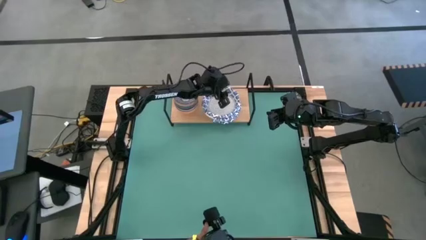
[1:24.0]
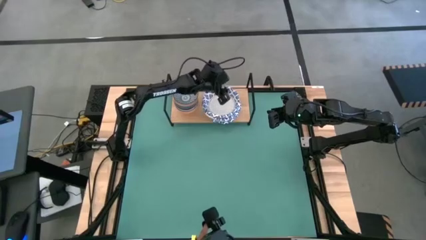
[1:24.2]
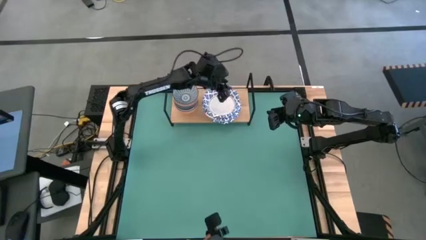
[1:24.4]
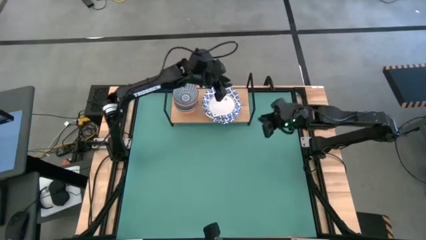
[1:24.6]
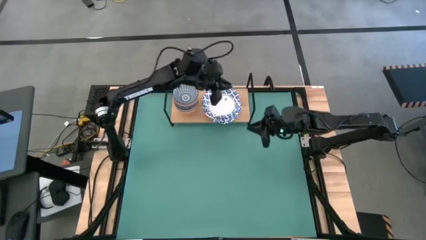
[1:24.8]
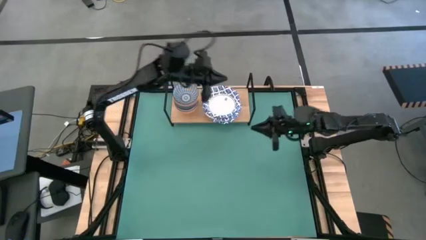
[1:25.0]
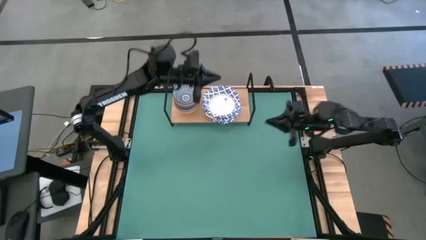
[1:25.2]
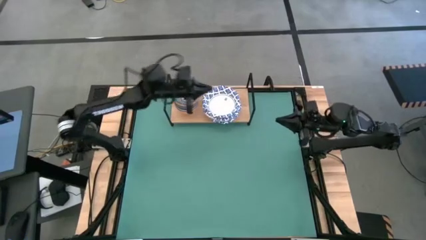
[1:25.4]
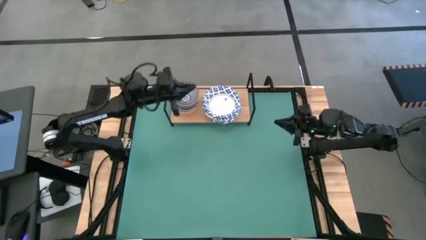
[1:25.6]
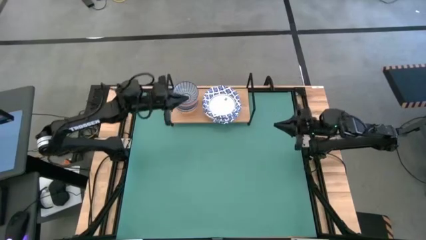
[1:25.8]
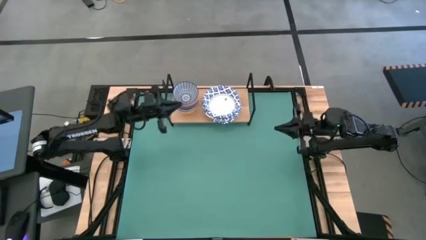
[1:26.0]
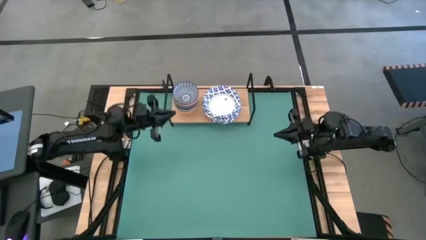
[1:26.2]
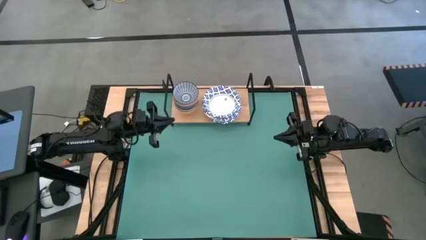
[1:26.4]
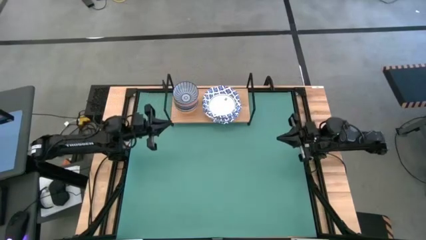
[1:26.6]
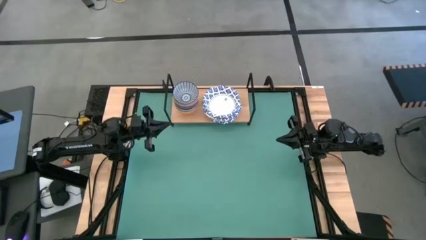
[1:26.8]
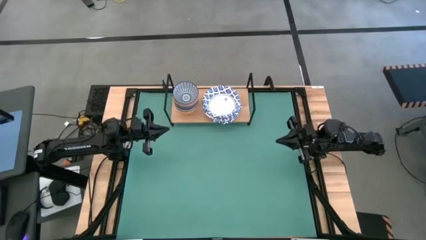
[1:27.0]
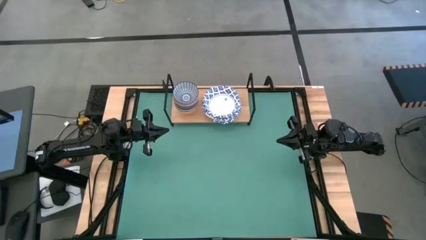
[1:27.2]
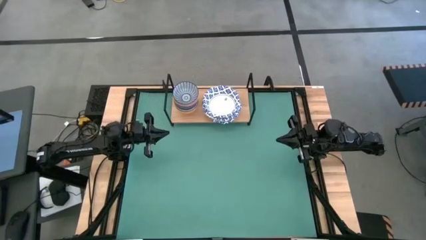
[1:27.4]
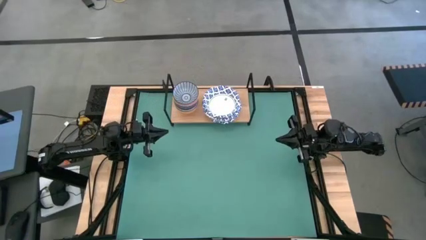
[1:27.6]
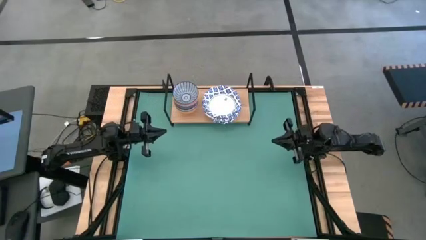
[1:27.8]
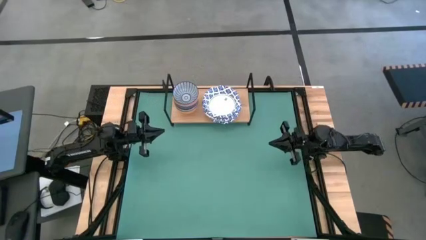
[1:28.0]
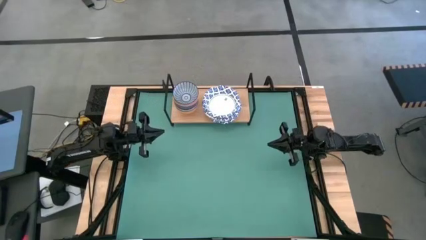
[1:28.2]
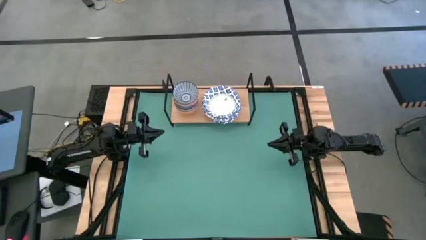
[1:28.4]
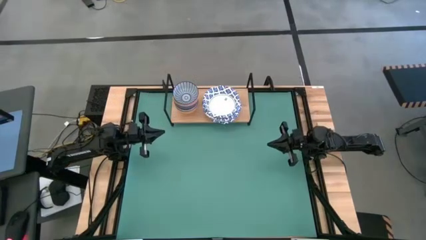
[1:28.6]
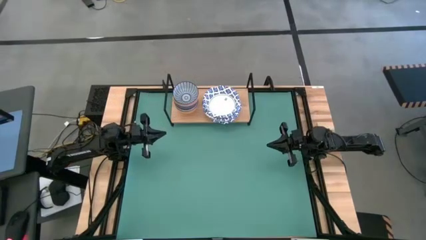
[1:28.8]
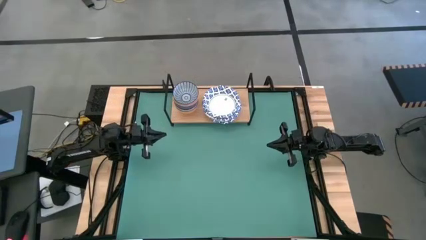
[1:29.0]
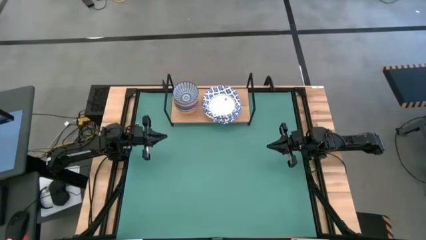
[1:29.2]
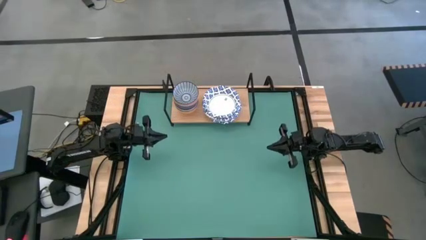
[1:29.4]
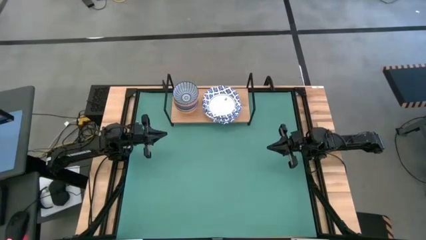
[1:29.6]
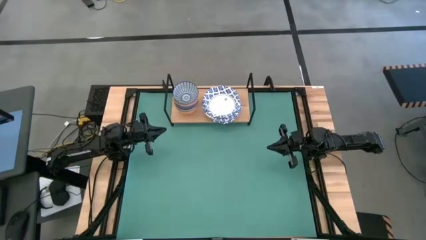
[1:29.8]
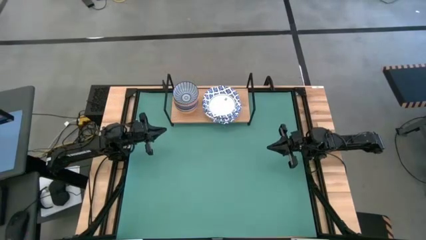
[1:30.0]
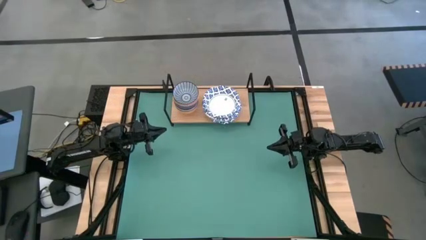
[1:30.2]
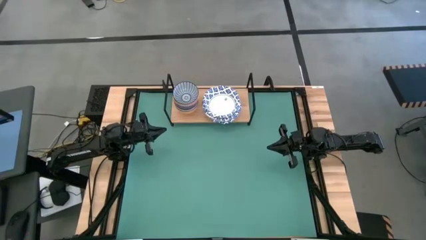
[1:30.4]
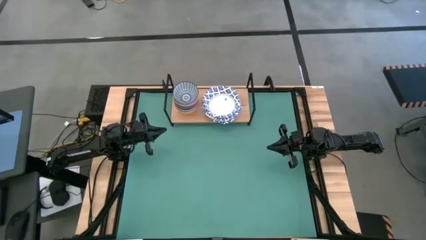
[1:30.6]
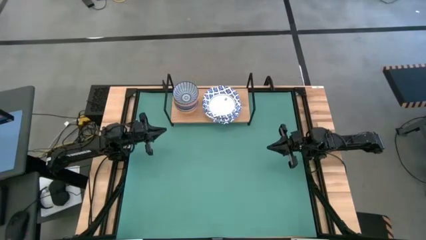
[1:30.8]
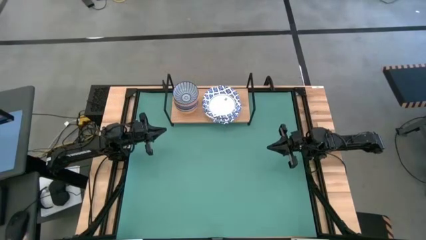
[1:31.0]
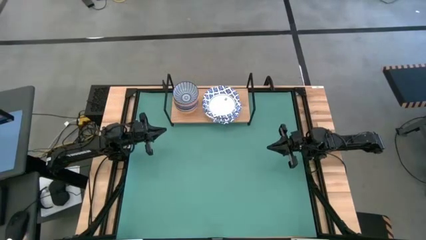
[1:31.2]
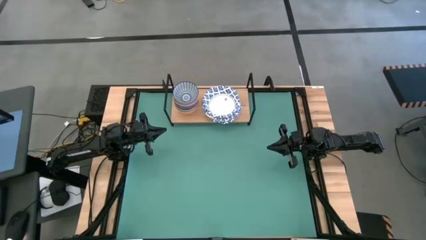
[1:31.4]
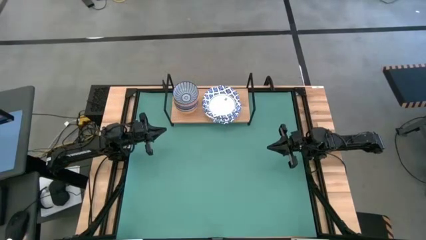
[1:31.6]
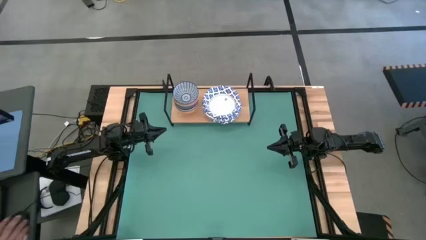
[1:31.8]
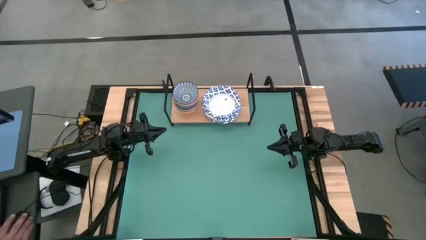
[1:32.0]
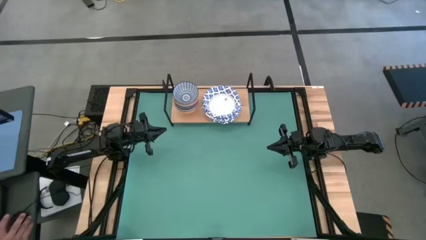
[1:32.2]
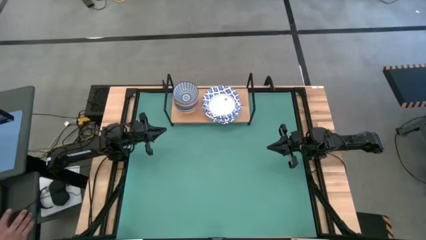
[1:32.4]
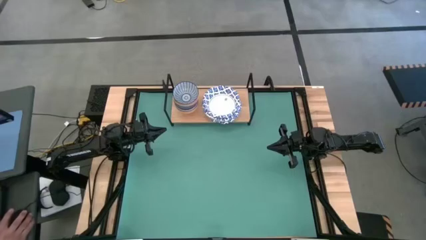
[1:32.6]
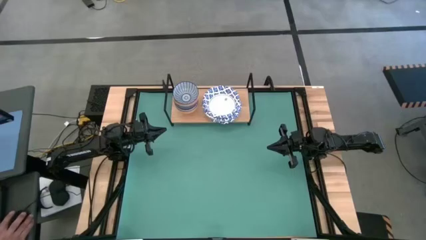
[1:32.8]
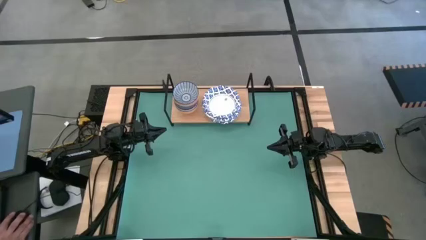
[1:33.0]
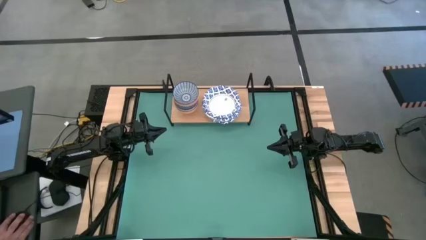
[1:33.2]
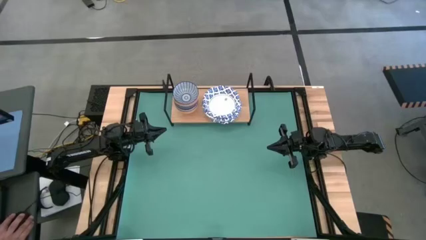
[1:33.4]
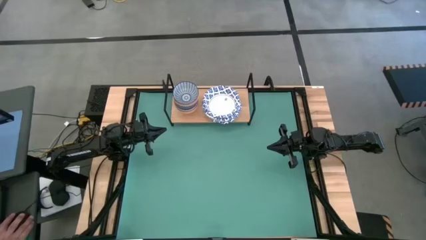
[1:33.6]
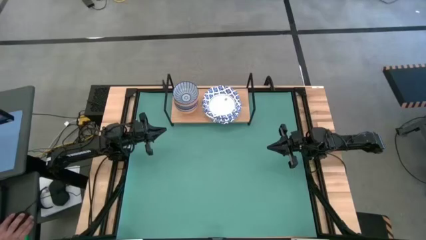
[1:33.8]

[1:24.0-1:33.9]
Task: Place and stack bowls onto a shelf
Return to Home Position

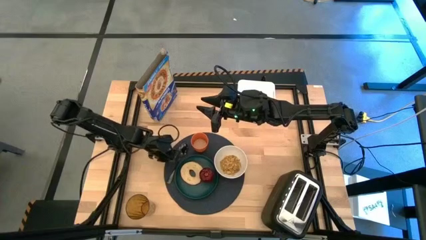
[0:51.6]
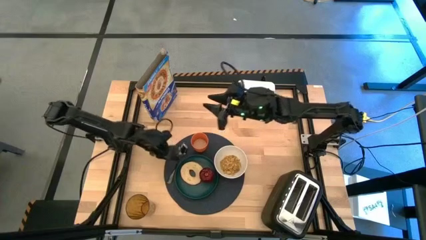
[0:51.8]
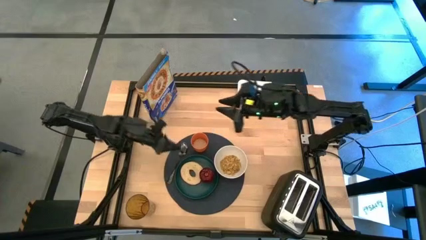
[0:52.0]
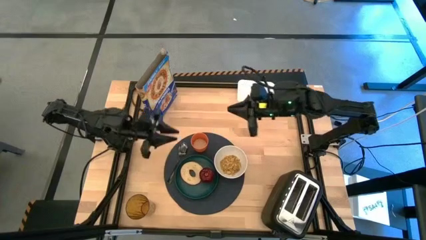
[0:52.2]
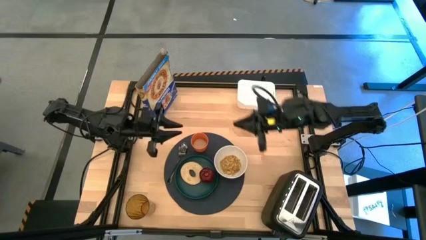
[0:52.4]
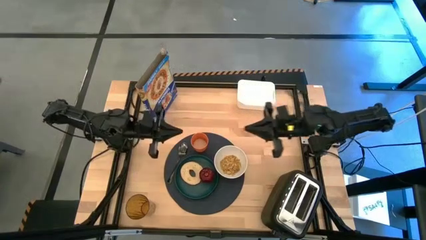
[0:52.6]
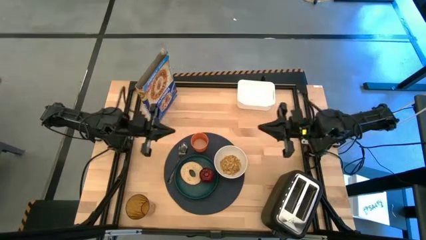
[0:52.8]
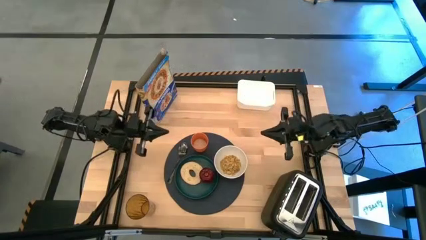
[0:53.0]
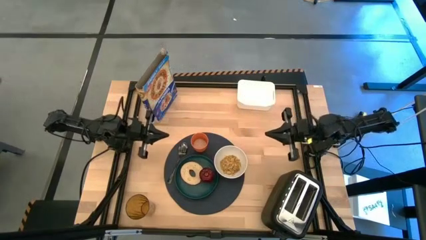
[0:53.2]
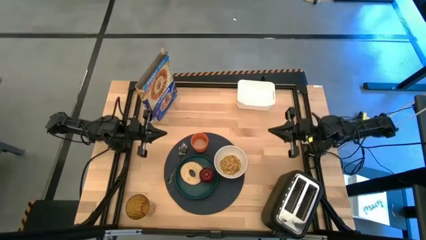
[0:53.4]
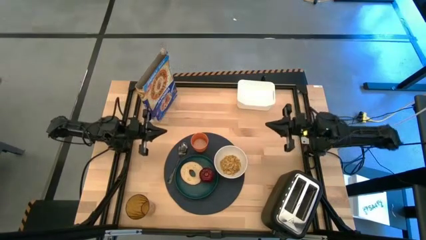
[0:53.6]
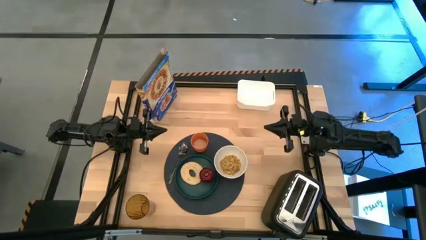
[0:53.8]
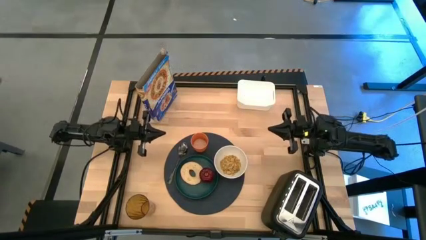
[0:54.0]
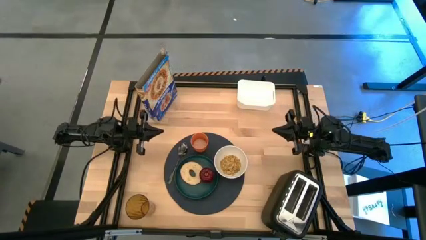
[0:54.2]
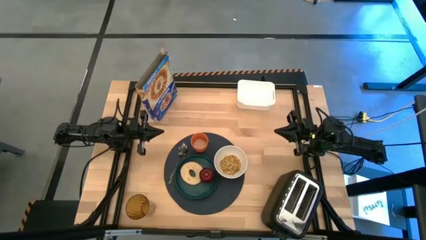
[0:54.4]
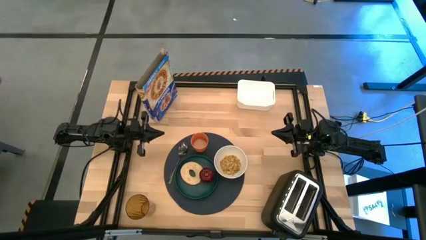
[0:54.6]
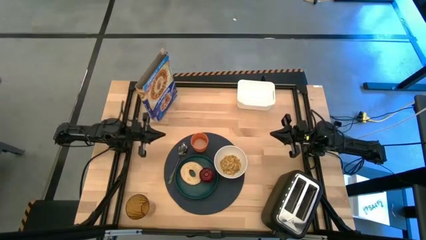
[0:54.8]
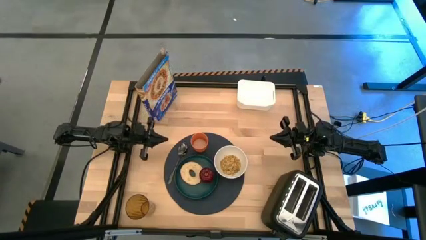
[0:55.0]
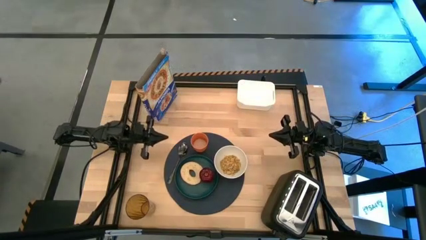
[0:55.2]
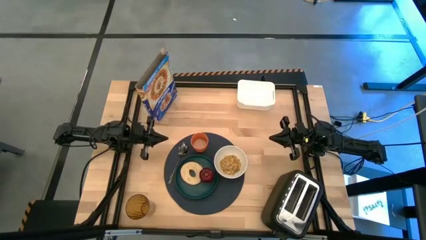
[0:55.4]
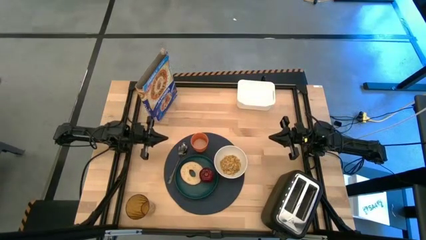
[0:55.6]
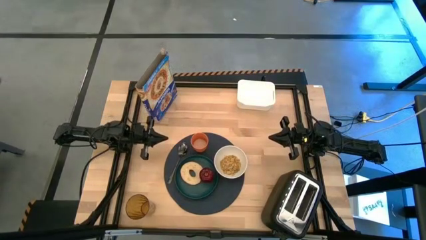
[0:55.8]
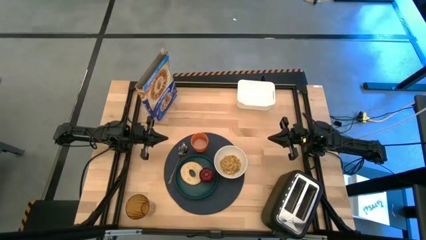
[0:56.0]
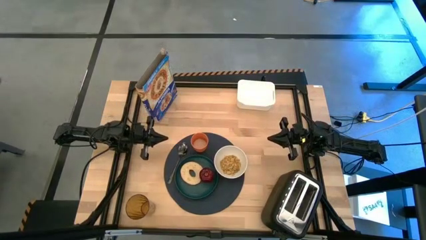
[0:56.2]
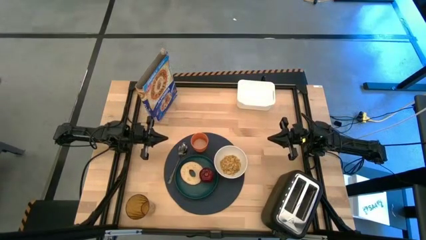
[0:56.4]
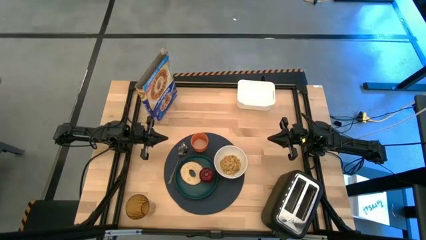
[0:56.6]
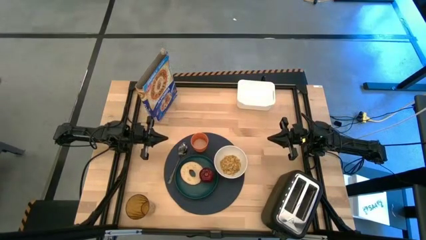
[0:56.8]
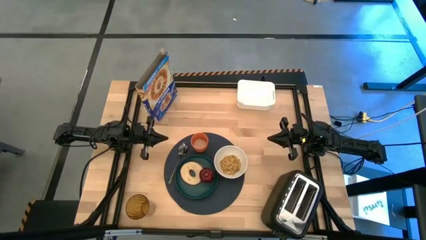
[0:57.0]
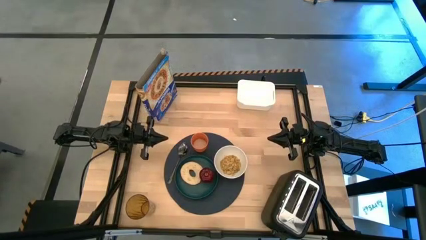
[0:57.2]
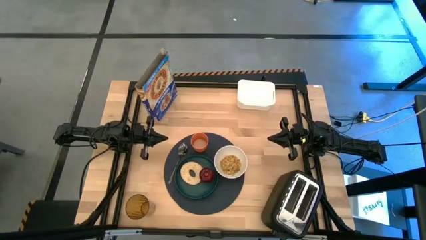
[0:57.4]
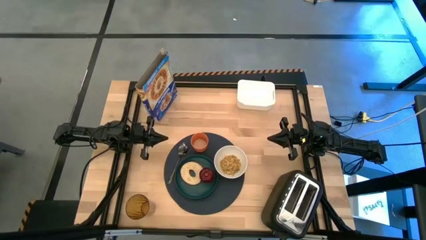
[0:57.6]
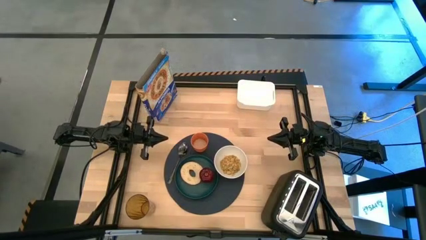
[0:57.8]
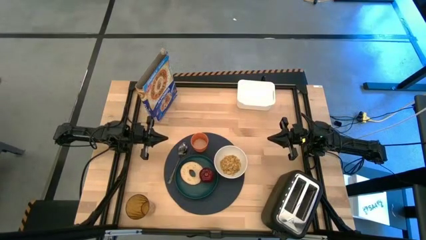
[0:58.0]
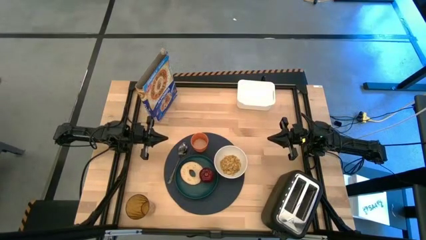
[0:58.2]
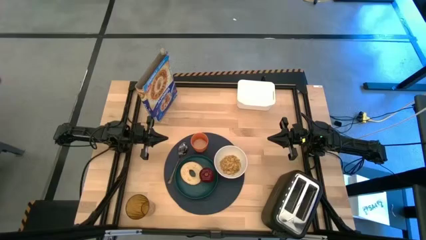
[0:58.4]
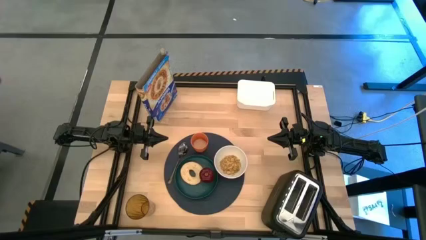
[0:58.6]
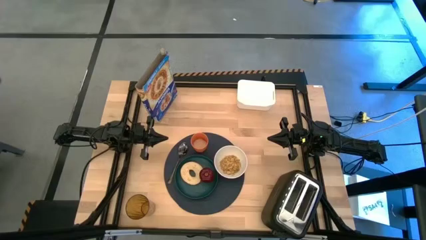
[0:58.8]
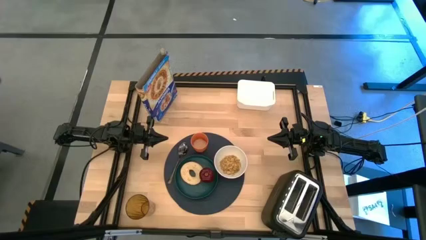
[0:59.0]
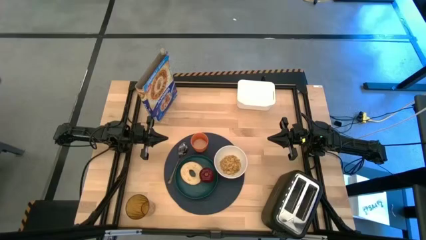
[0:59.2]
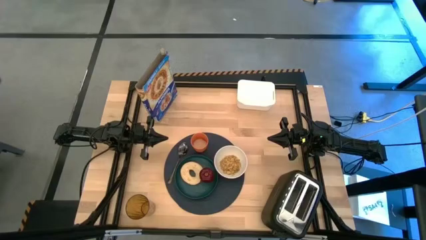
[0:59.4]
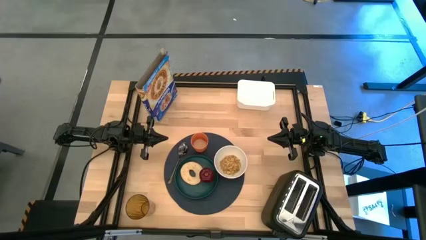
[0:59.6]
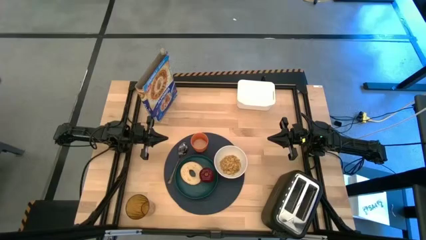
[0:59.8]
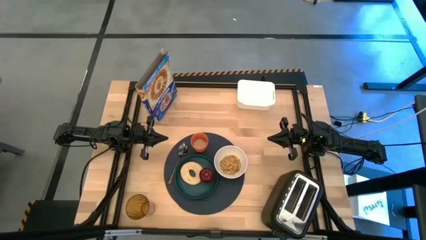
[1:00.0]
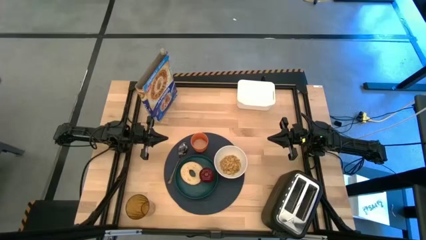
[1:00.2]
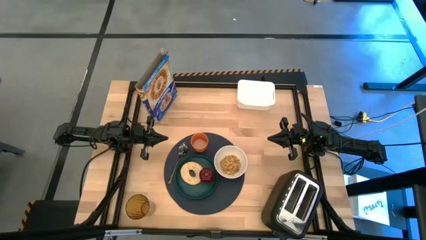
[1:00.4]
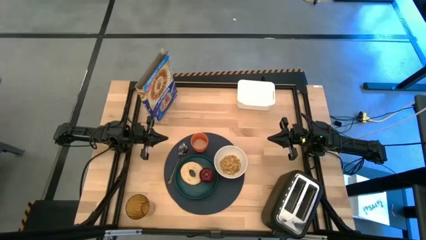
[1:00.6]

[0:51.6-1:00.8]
Task: Arrange a breakfast setting
Return to home position
